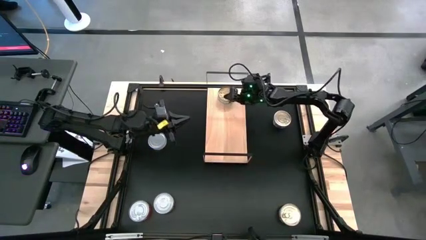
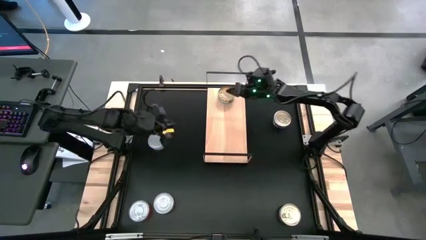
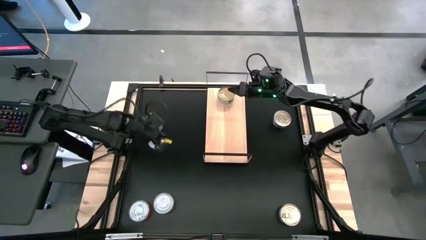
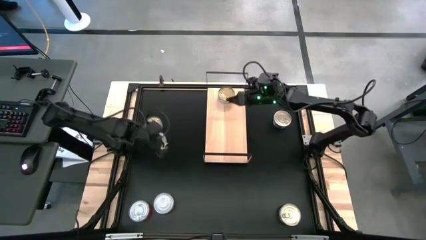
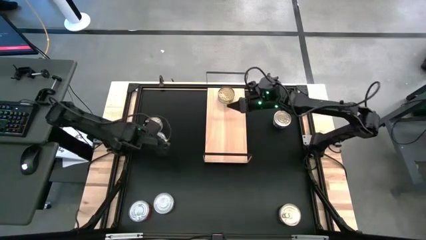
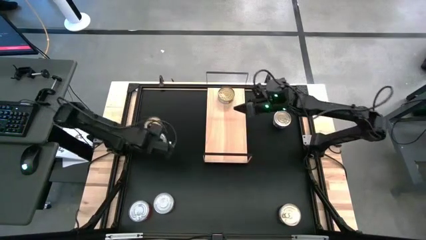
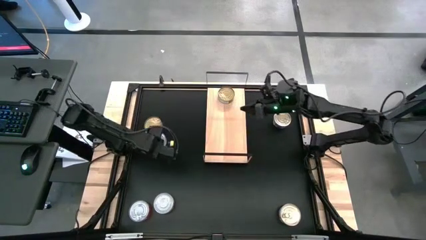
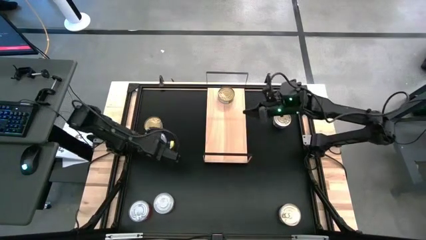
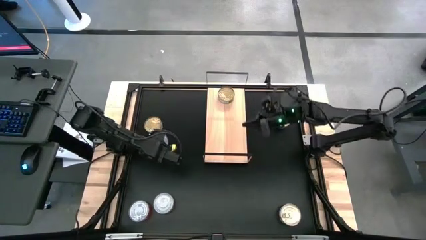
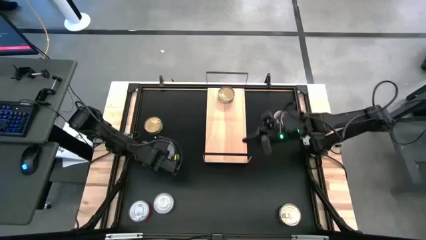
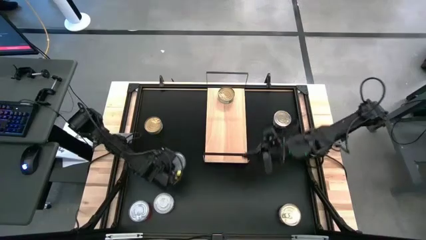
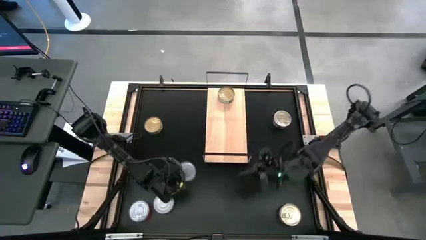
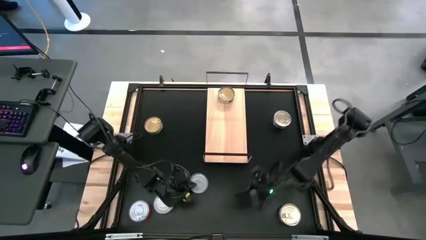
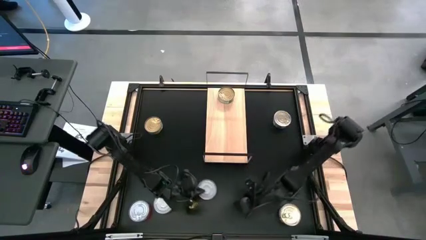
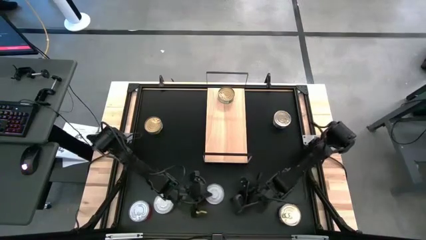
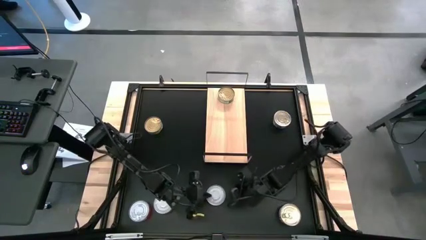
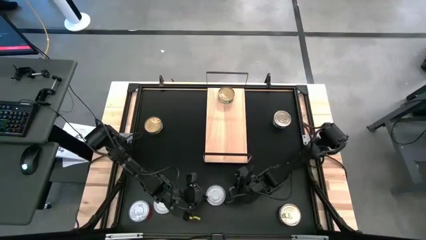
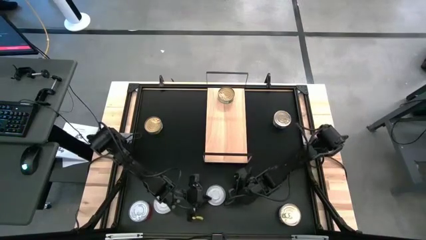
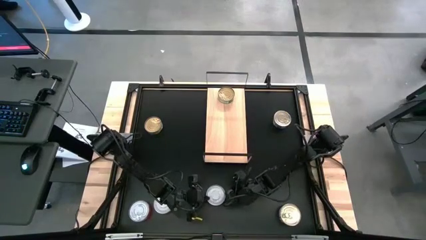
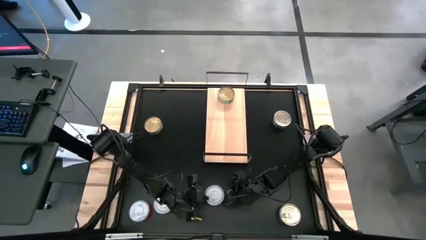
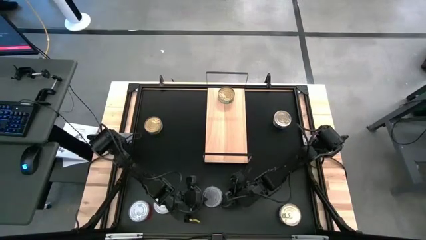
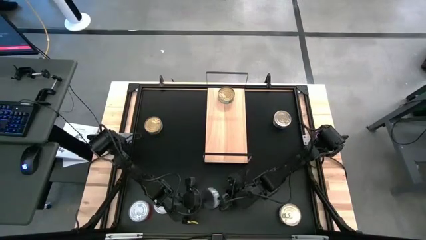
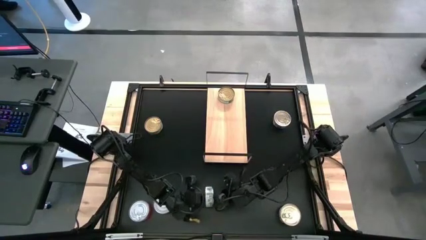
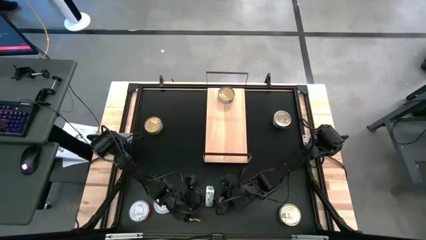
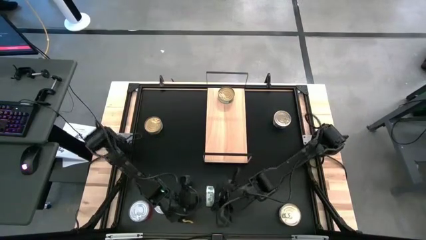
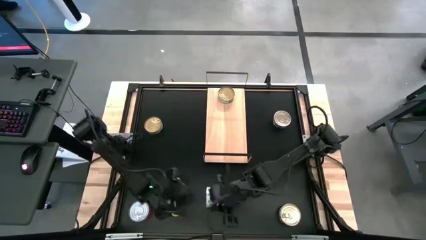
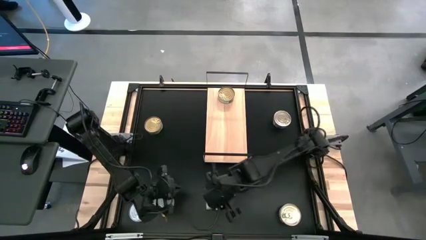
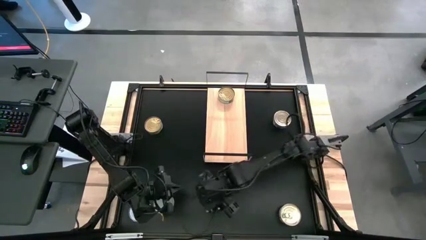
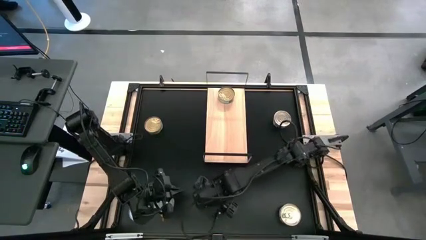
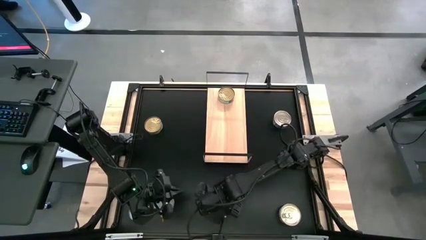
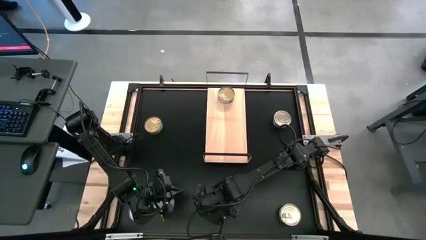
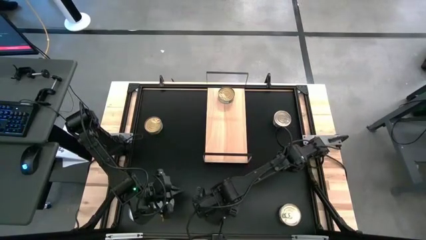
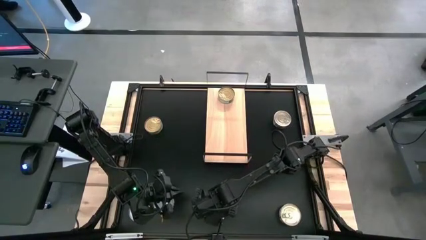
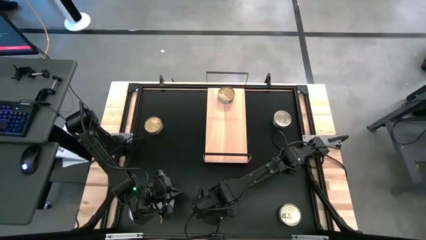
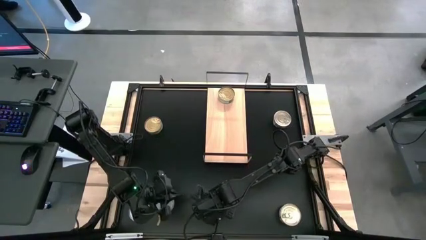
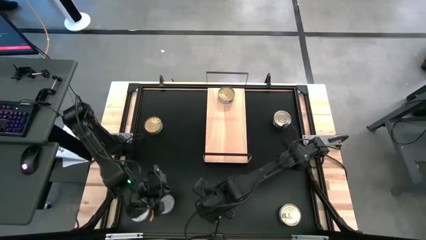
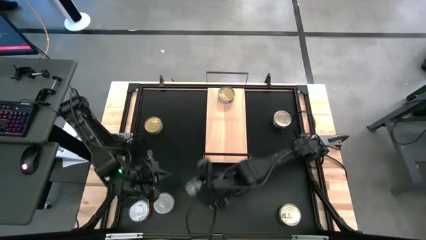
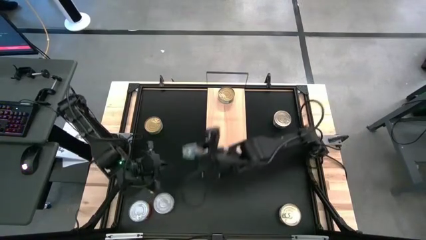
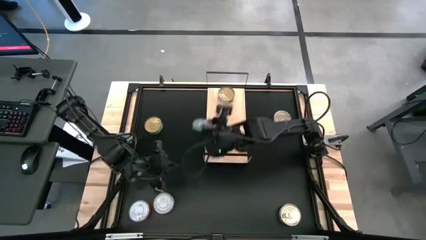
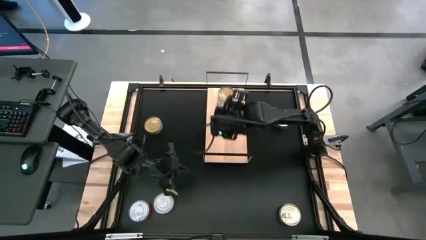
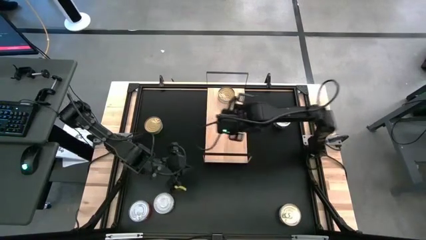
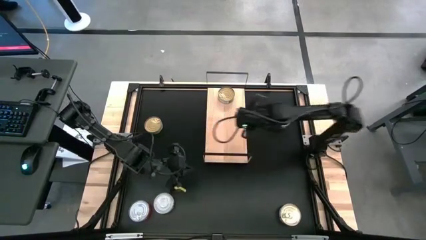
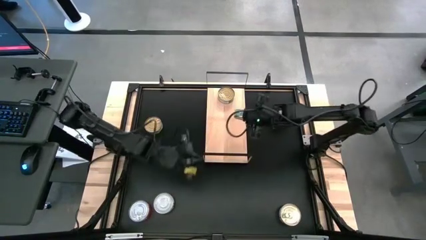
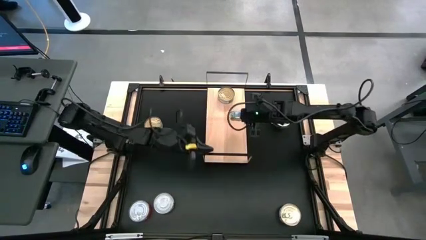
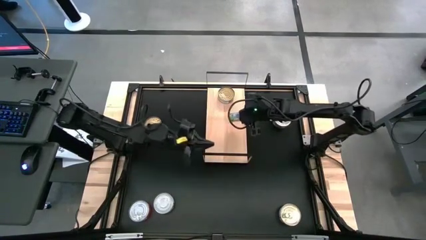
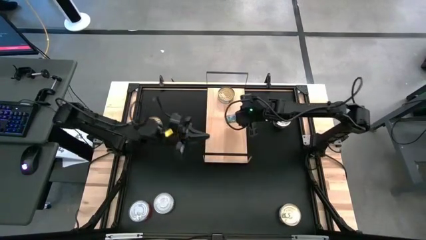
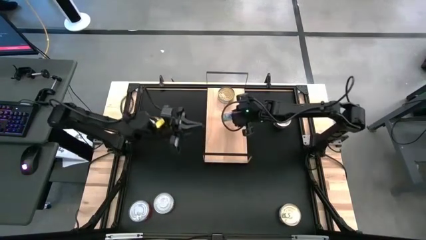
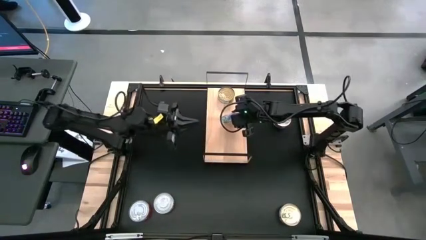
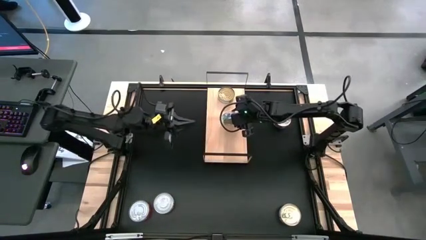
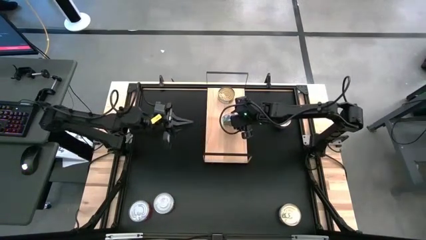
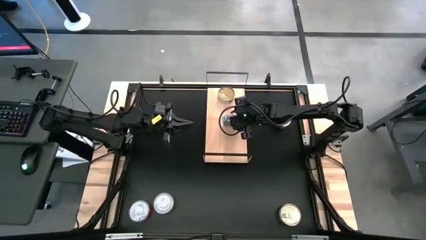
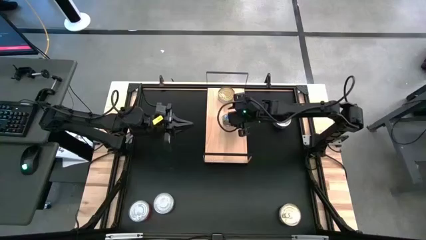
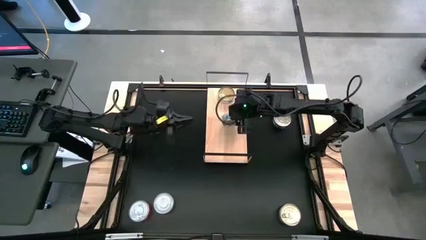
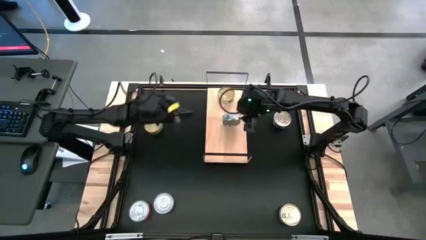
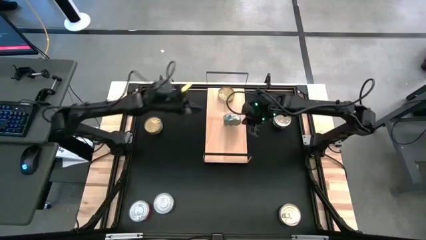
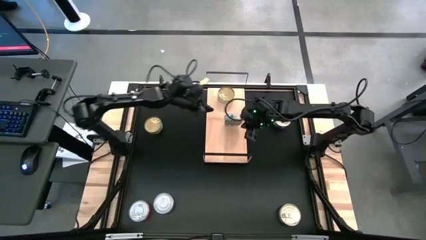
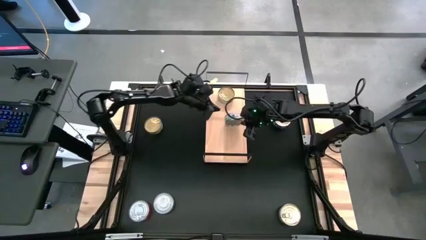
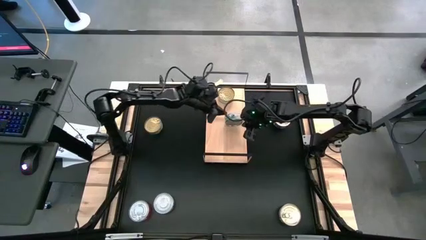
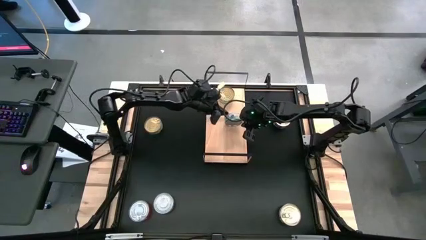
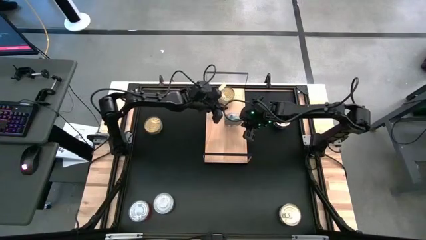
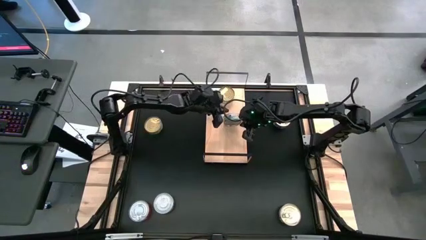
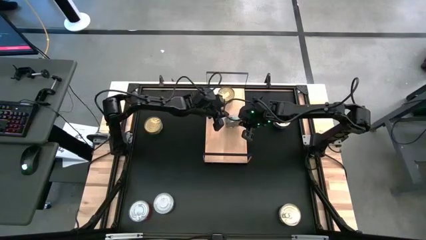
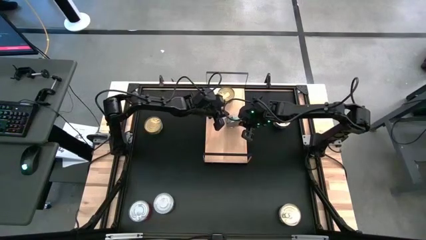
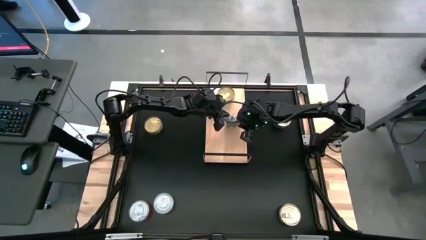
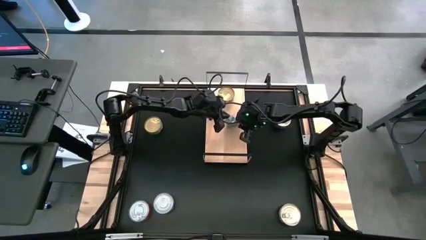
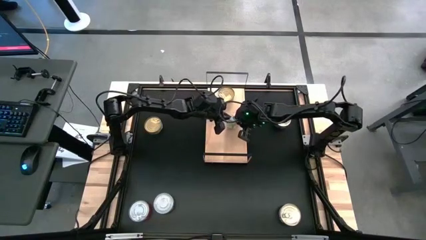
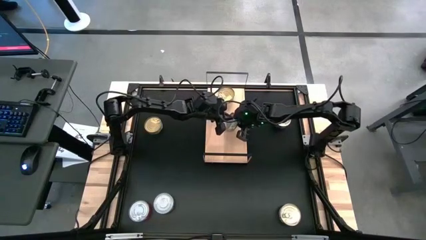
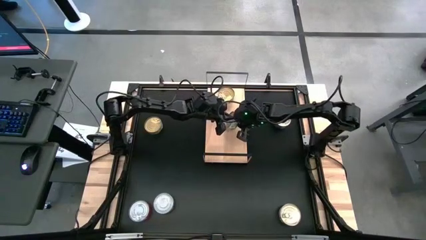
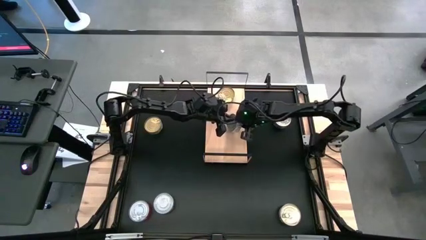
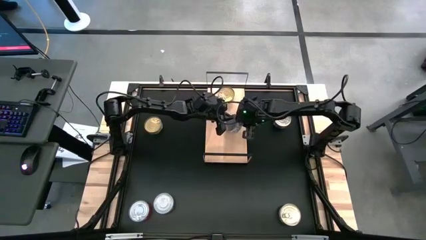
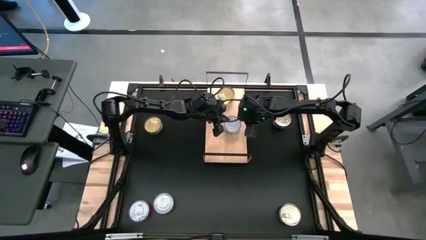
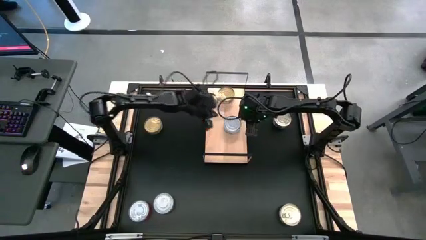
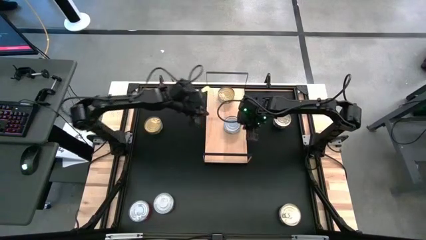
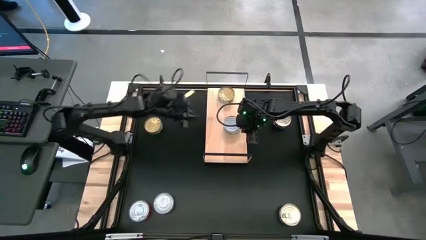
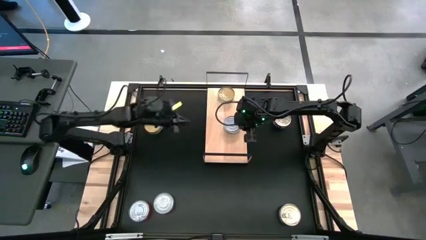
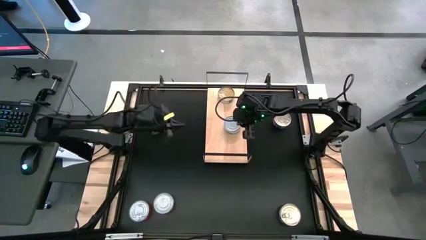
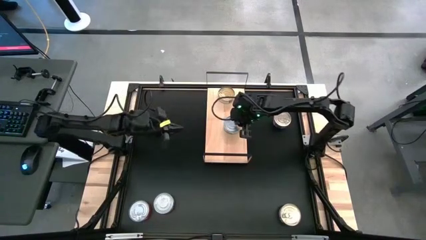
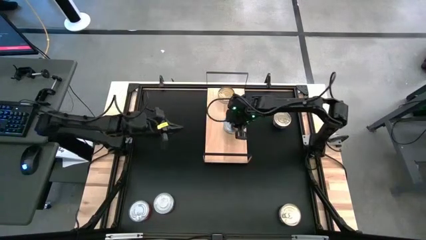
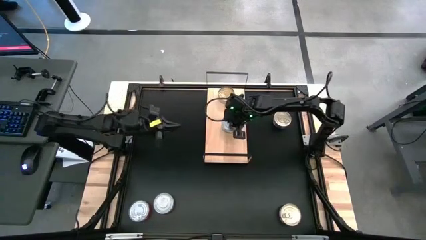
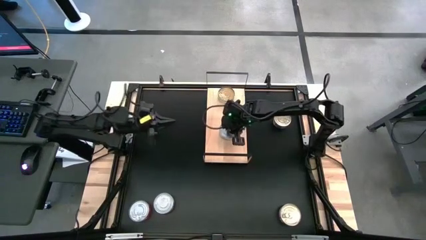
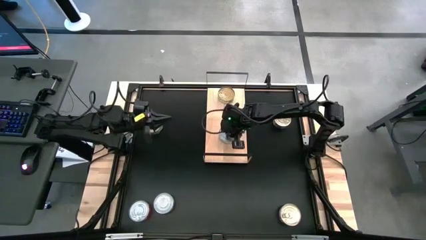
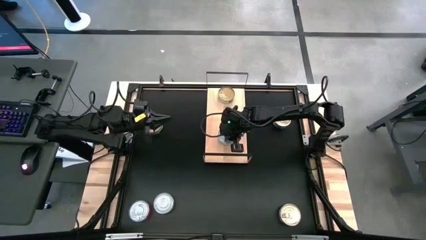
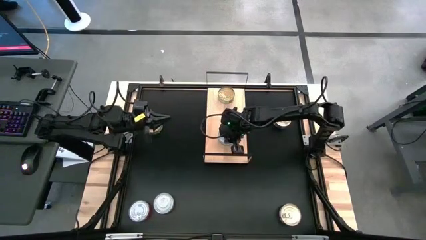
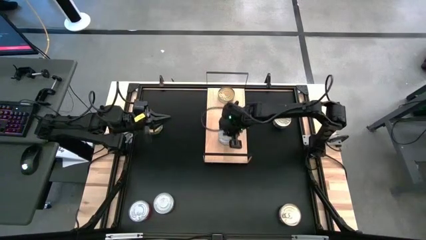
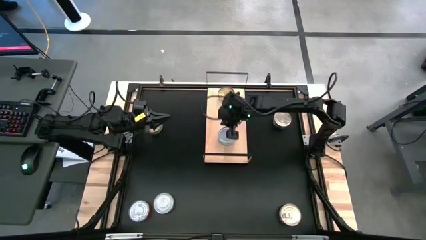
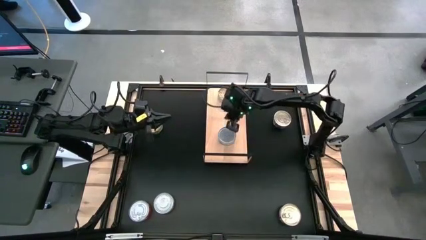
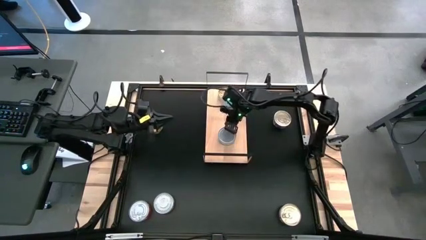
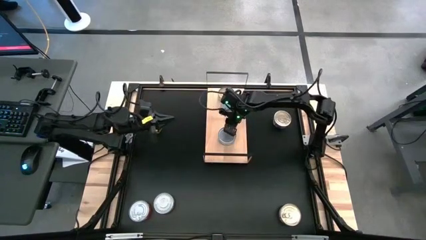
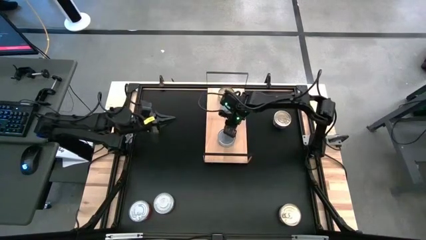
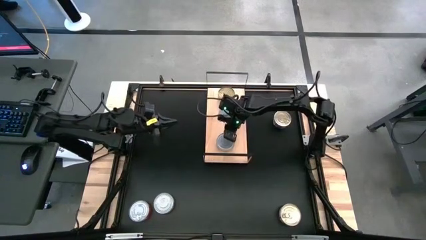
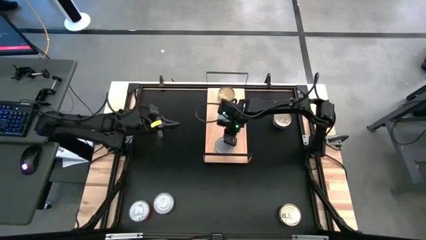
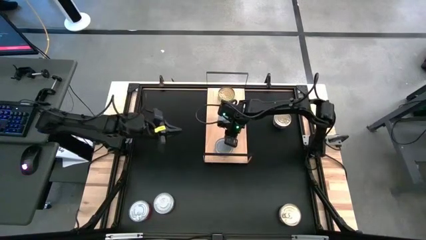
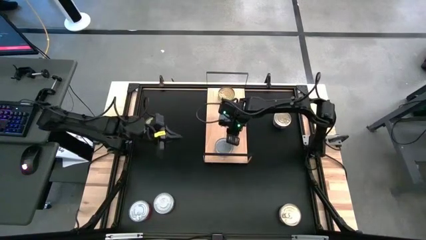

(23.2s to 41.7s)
Task: Stack canned seafood by type on shelf
Put the white-green tuna can on the shelf
